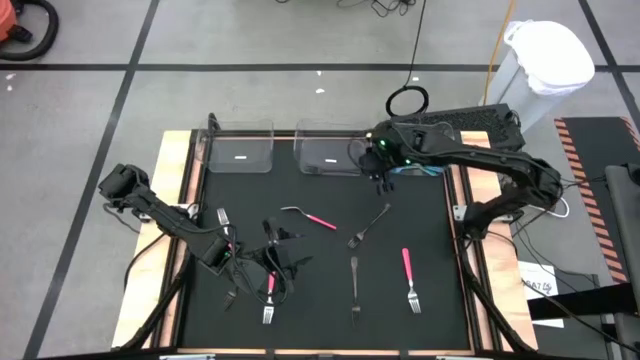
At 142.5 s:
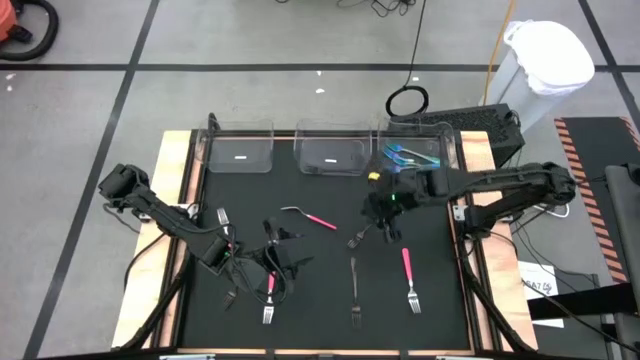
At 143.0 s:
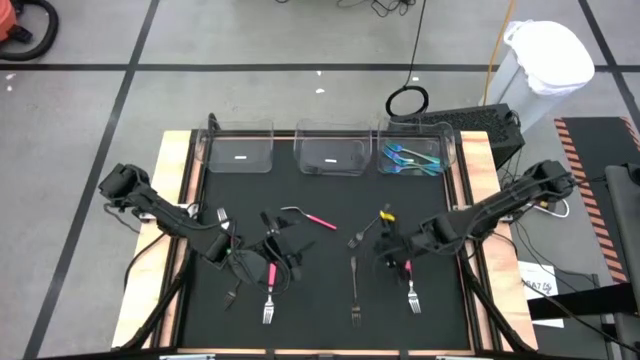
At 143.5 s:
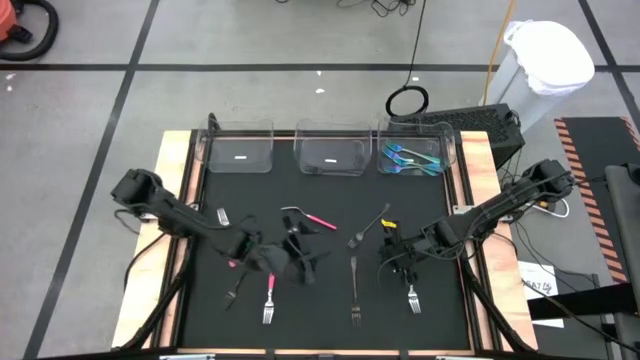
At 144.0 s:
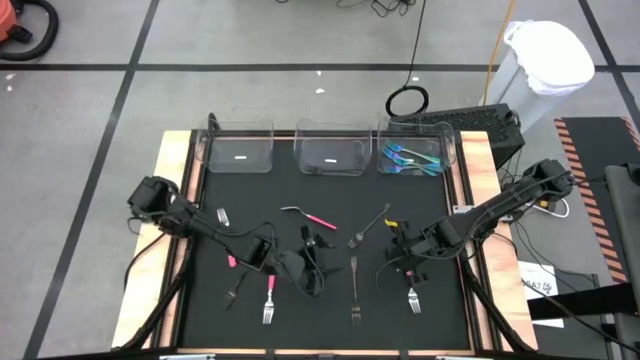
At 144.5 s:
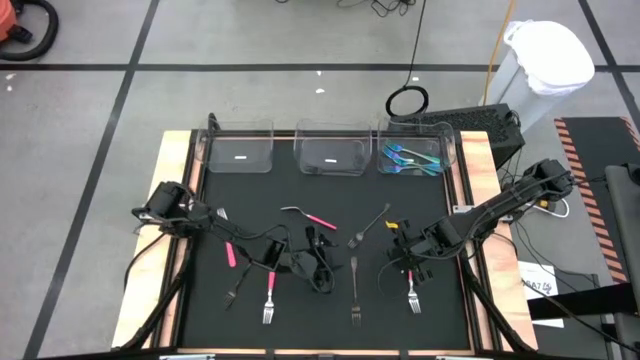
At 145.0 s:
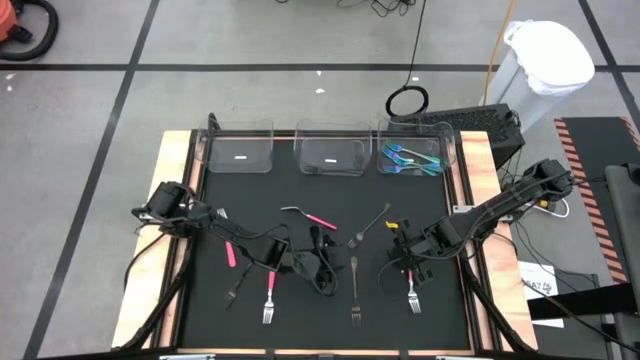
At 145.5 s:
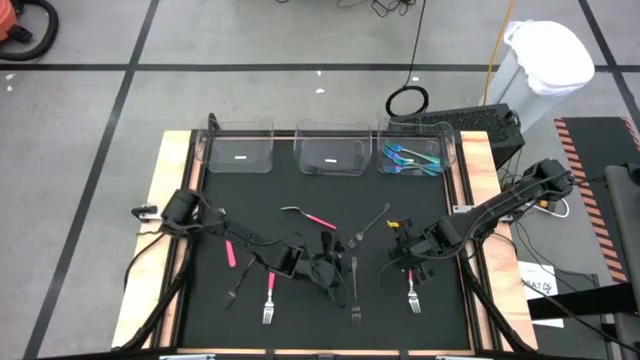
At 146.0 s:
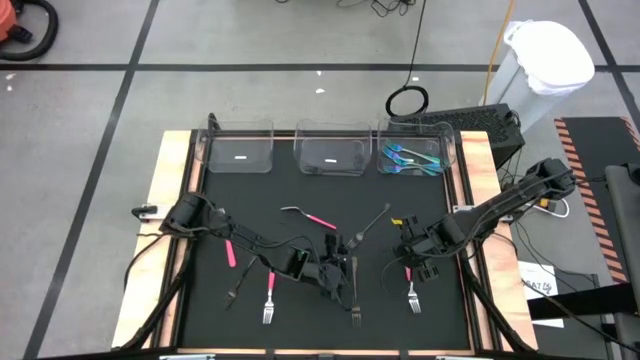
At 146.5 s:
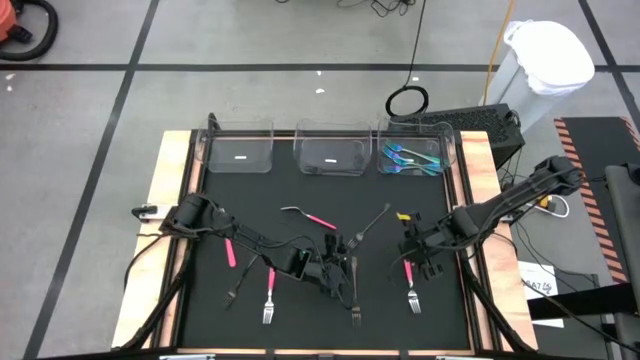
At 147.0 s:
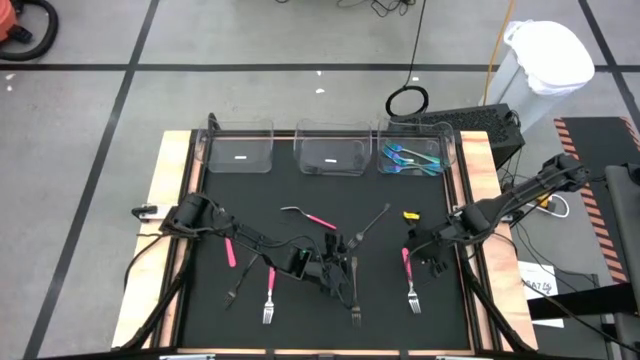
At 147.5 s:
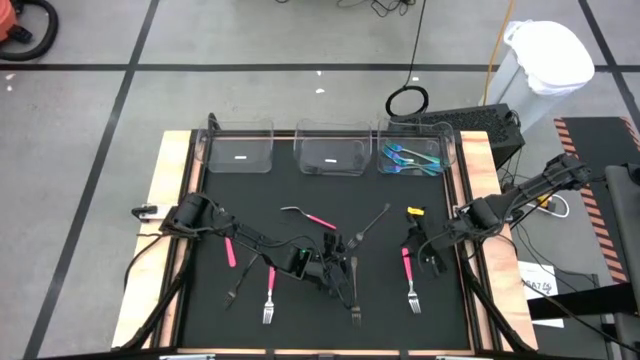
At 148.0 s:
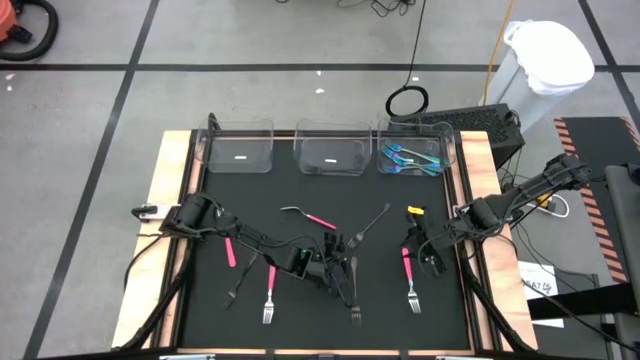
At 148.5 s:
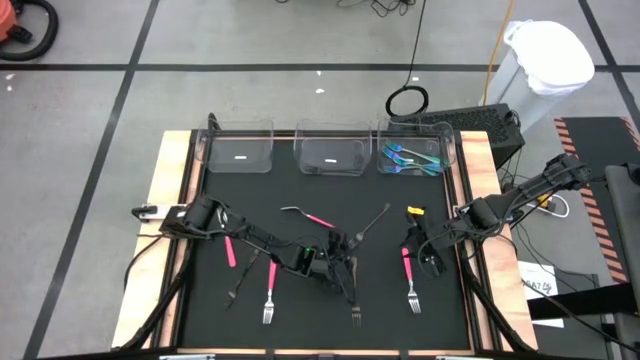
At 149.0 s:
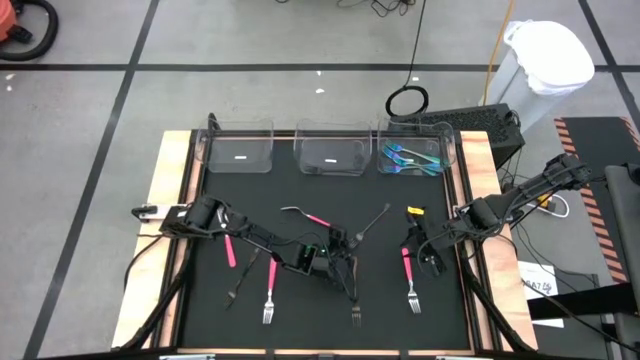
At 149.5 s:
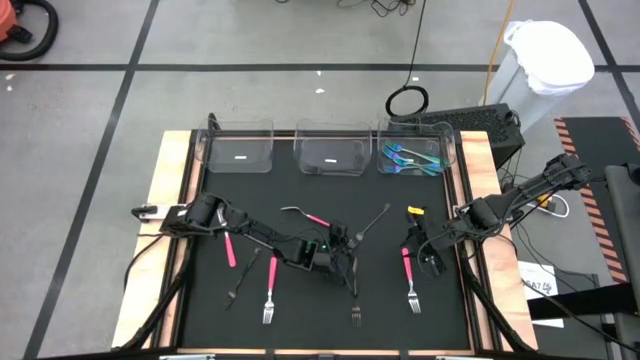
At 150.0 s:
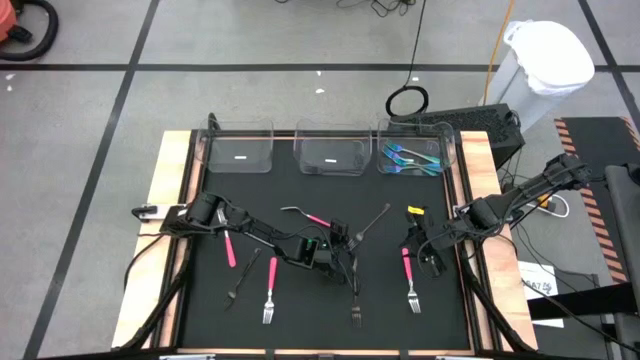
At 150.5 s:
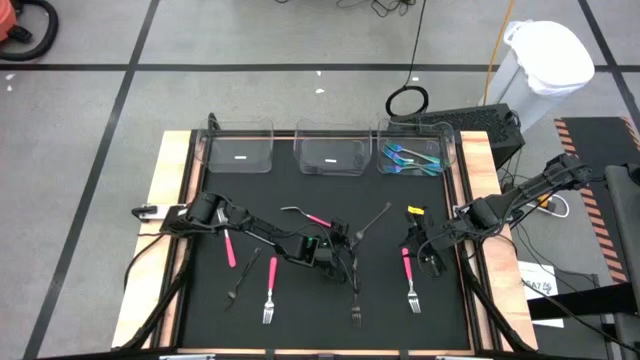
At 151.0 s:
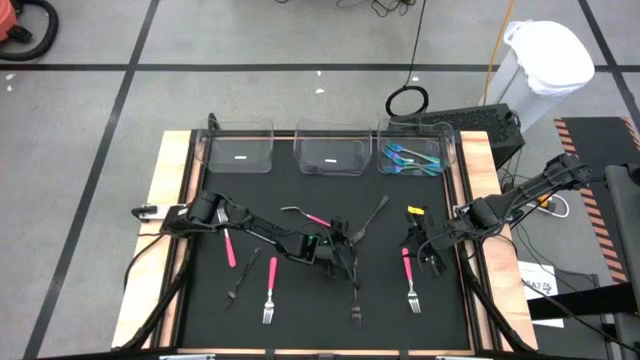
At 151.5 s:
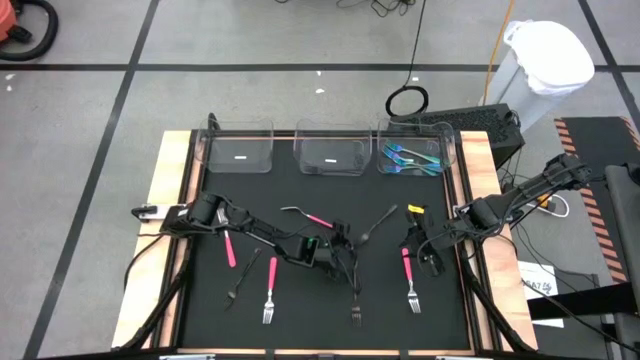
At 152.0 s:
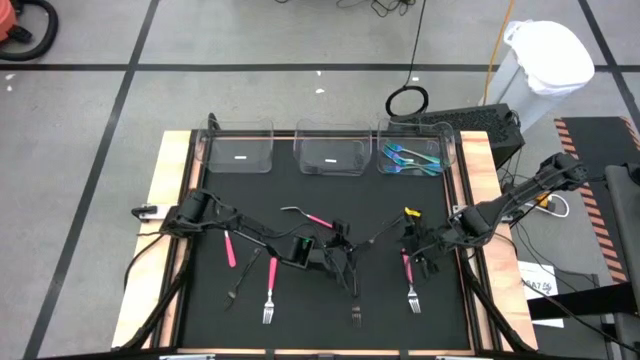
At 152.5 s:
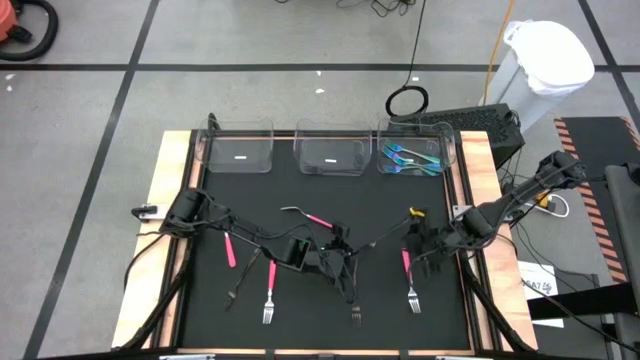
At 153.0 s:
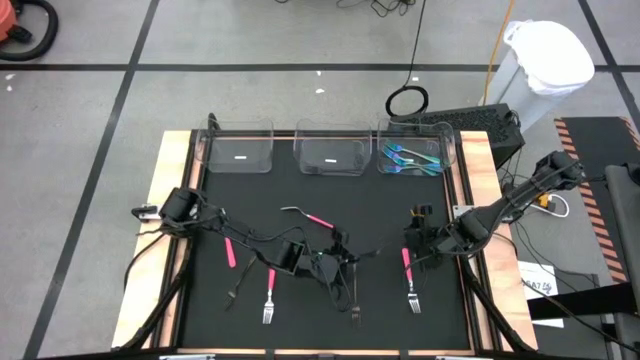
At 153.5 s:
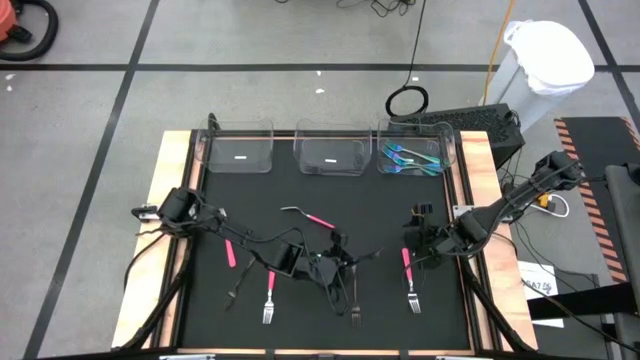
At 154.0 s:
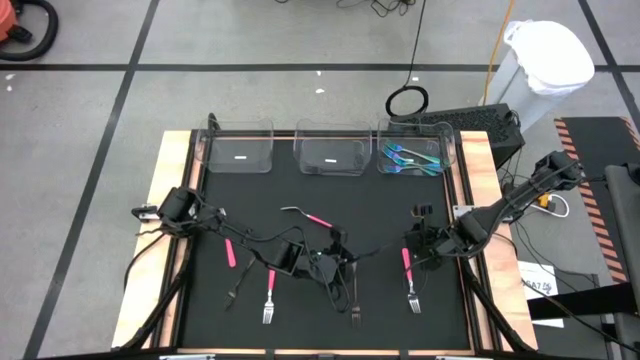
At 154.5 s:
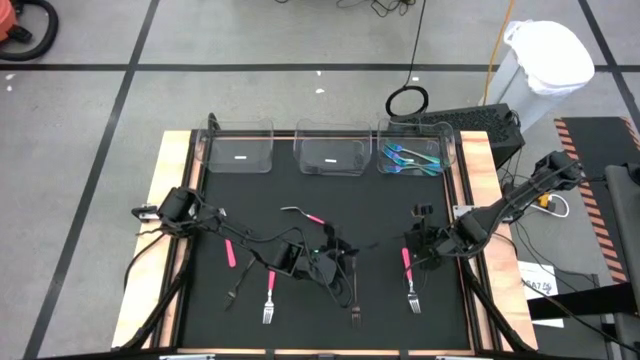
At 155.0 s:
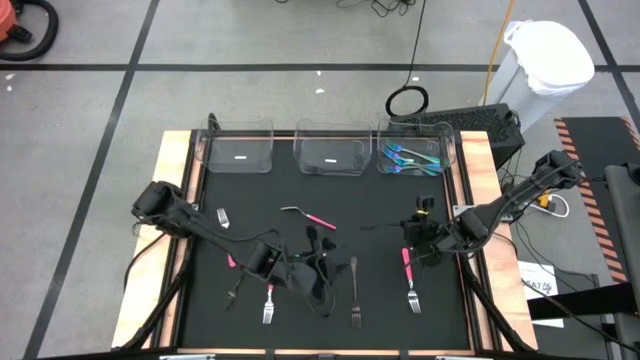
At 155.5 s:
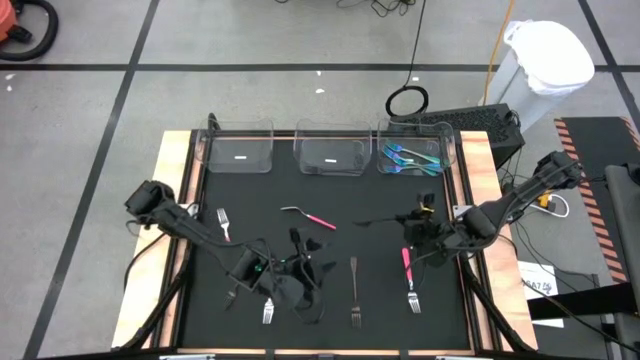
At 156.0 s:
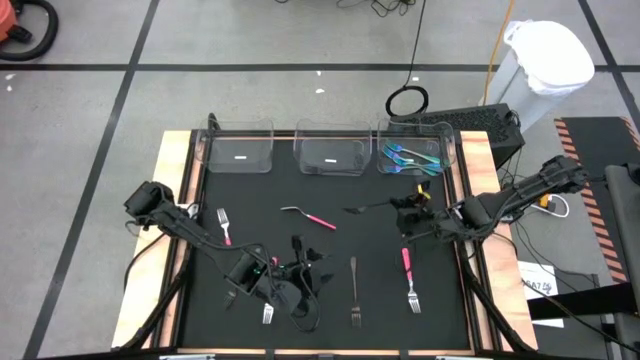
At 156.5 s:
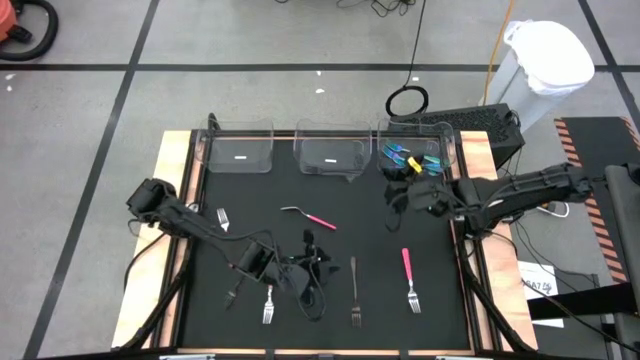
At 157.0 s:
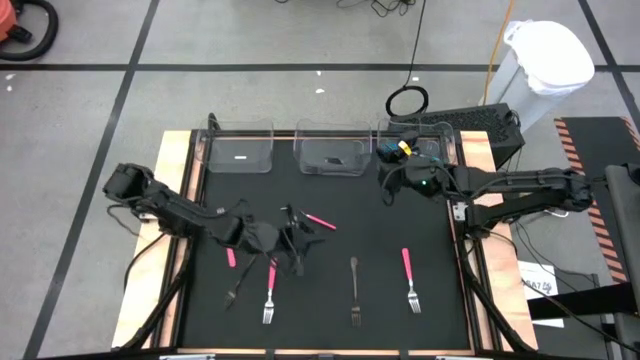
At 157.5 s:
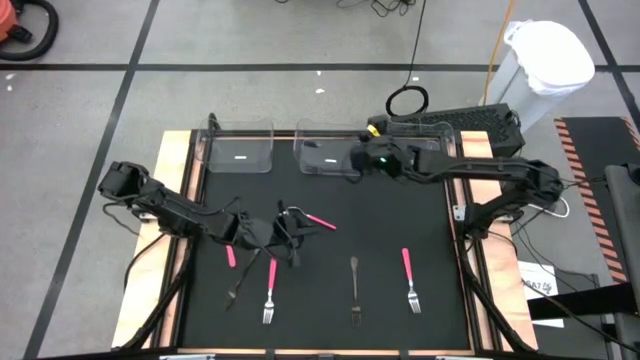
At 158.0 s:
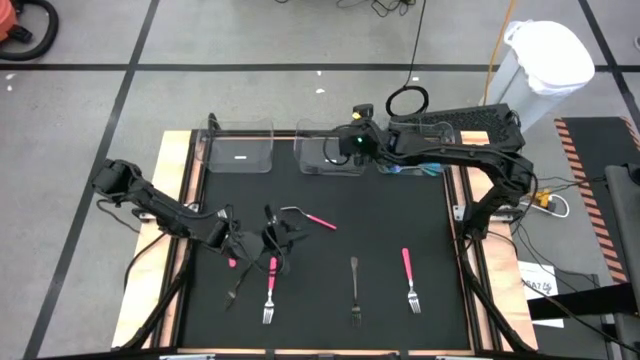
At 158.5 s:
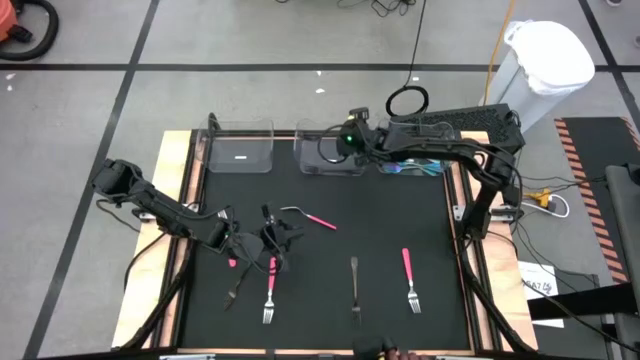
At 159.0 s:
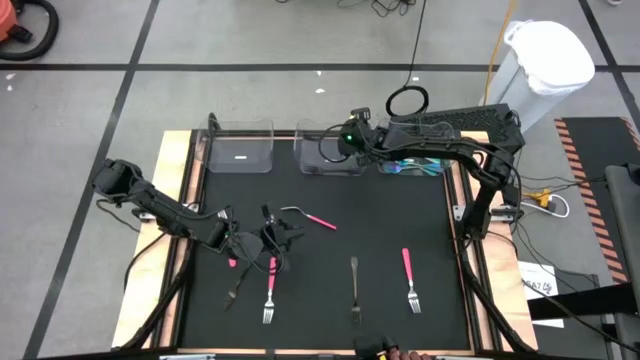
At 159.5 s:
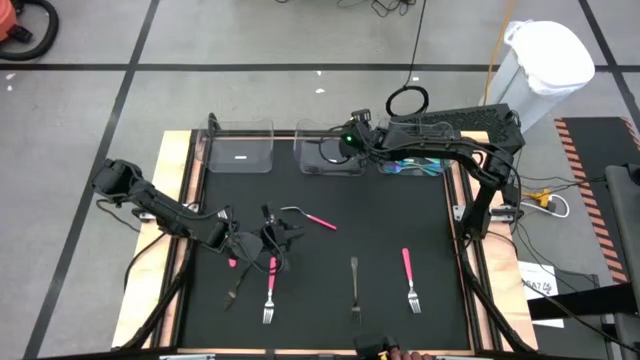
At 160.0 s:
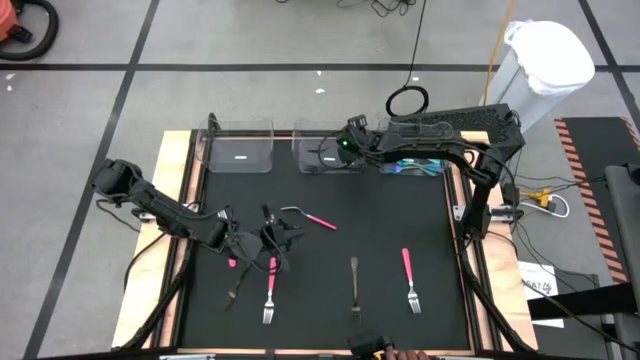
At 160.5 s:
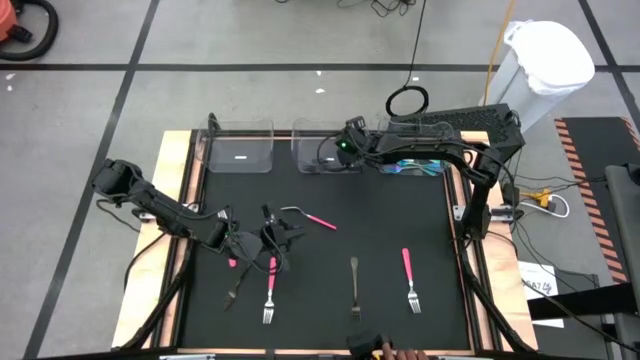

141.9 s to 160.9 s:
Task: Sort silverware by color (type)
Put the black fork into the middle transparent bin

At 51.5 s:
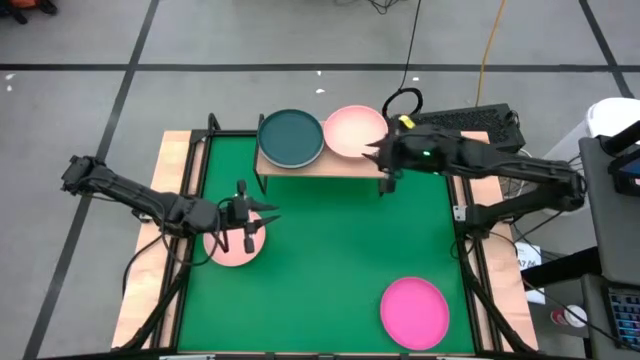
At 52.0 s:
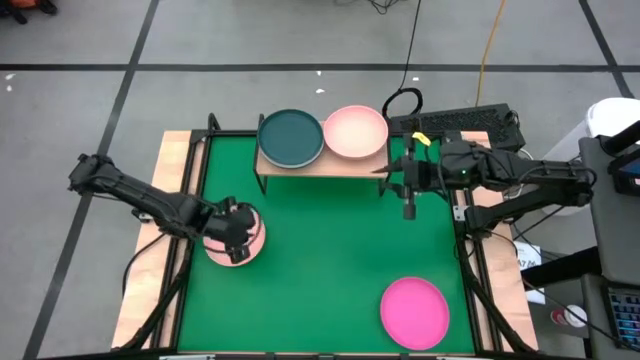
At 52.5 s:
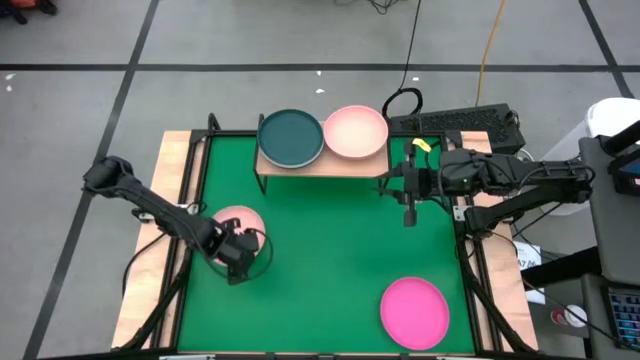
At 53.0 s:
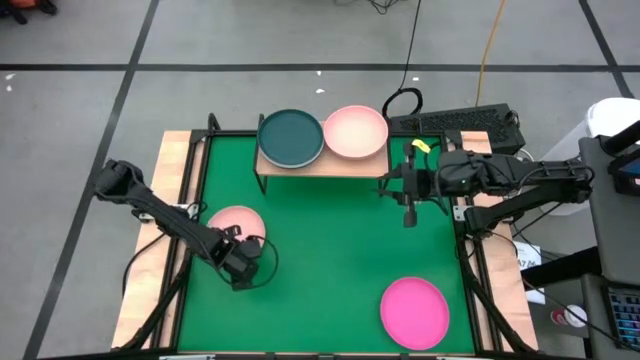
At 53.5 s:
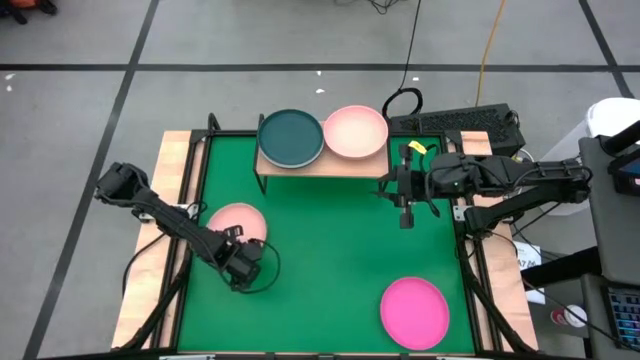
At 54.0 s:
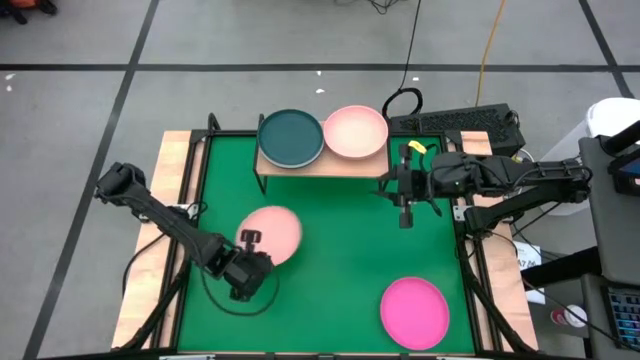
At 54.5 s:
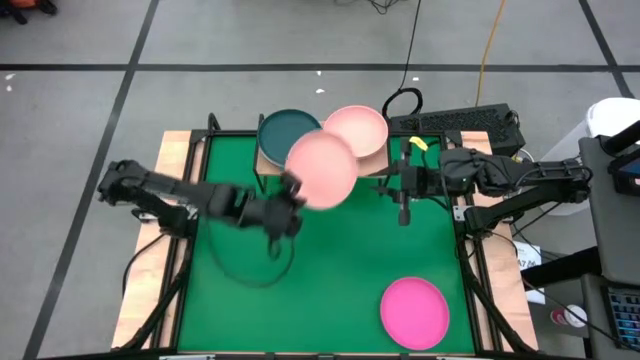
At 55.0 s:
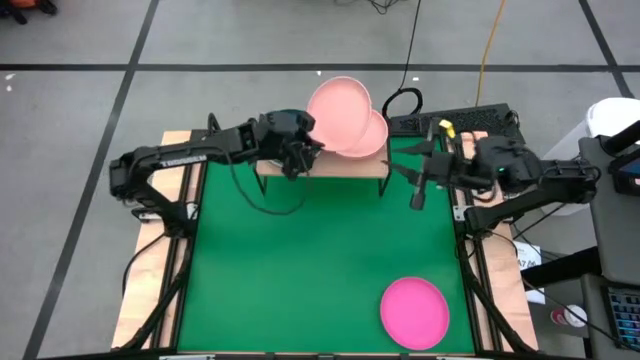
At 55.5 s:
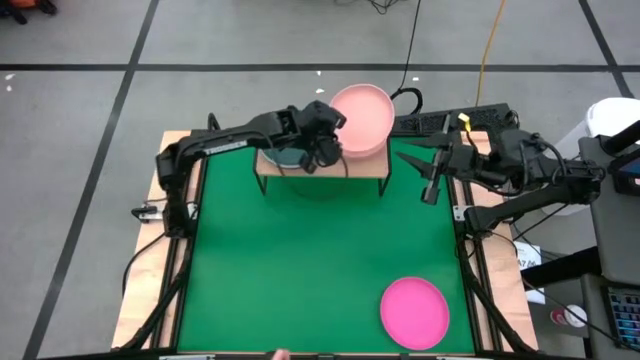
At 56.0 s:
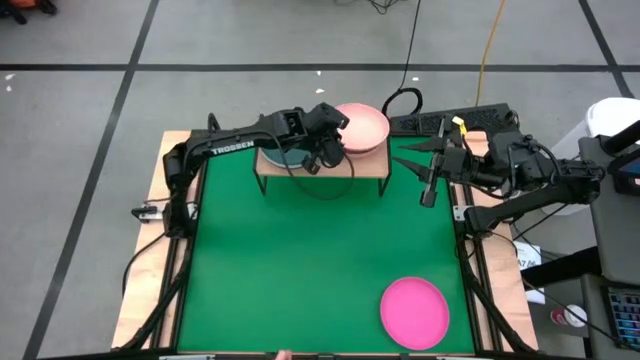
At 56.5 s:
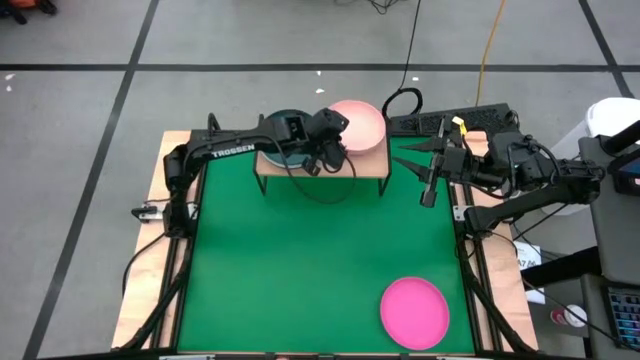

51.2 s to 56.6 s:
Task: Place and stack plates onto a shelf
Stack the light yellow plate on top of the other light yellow plate on the shelf
